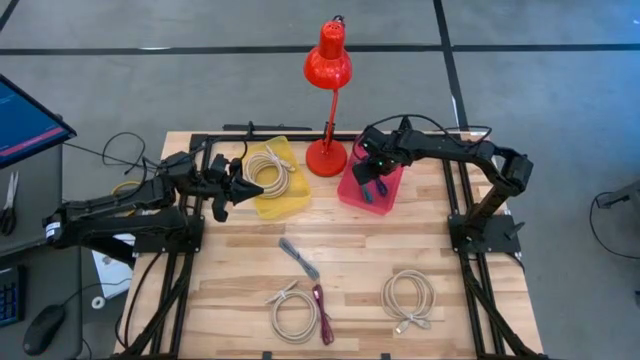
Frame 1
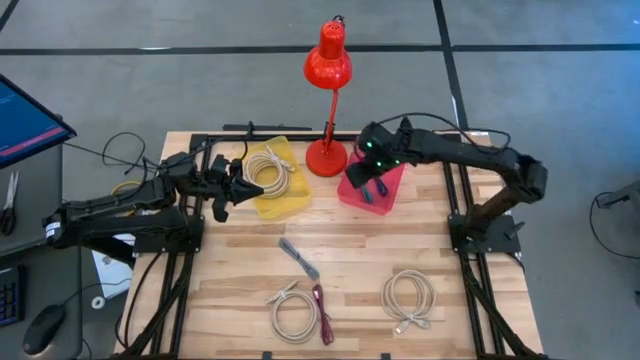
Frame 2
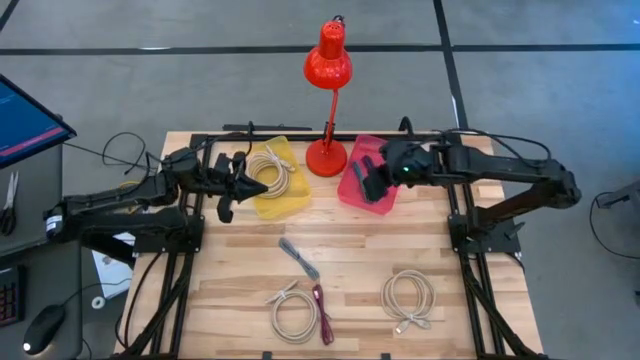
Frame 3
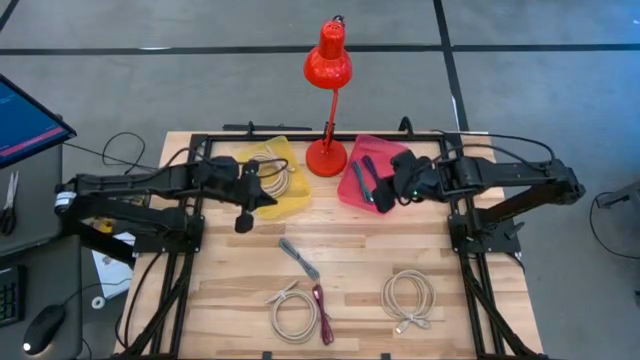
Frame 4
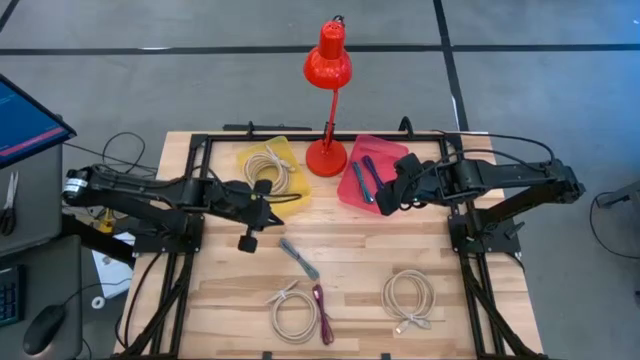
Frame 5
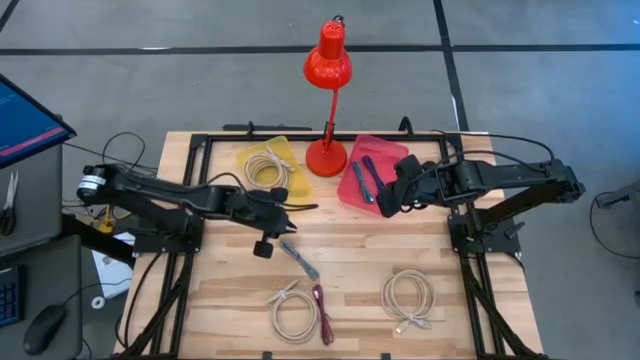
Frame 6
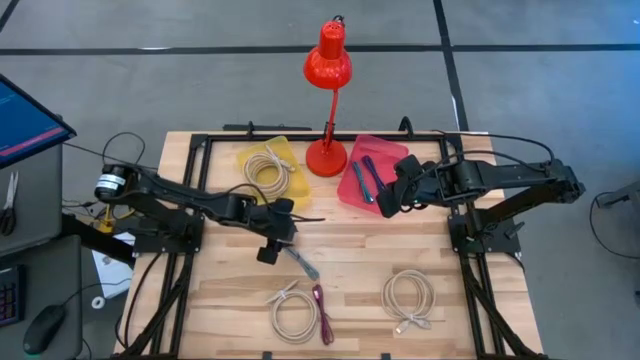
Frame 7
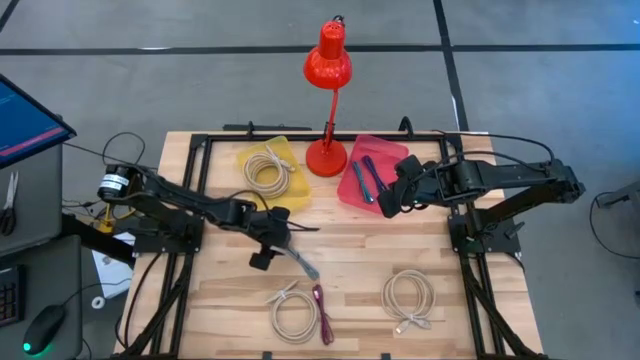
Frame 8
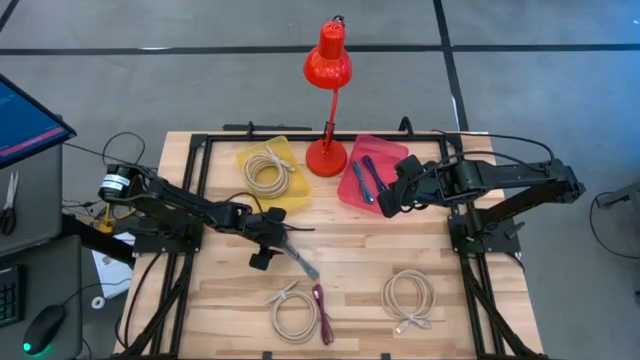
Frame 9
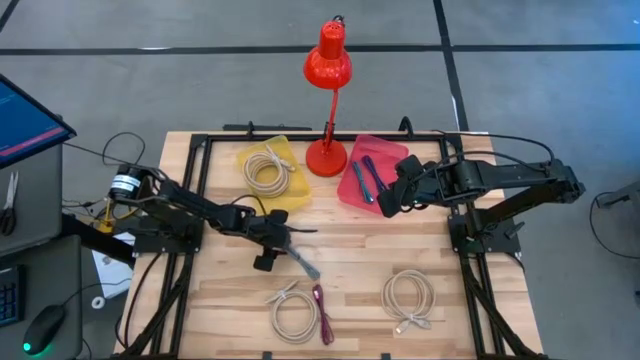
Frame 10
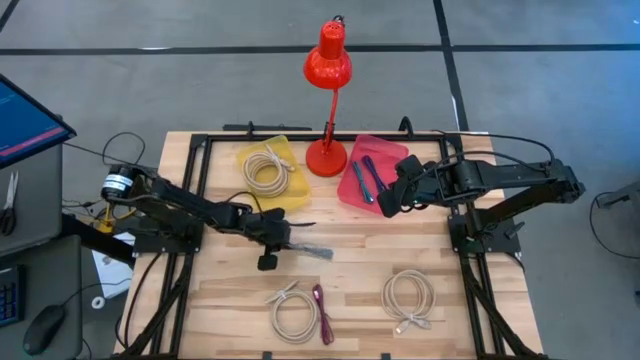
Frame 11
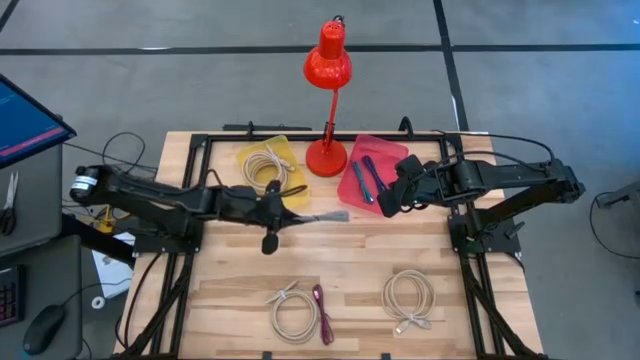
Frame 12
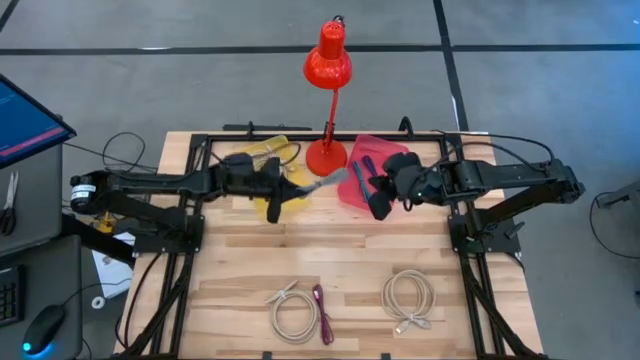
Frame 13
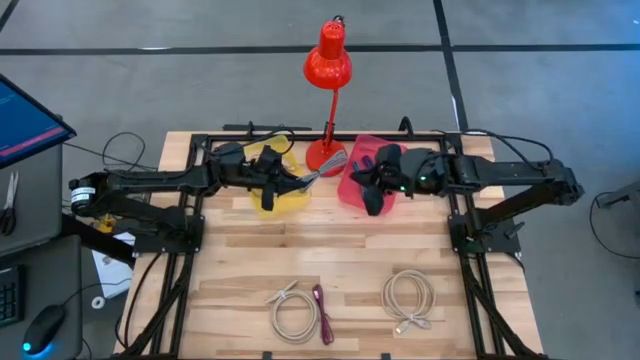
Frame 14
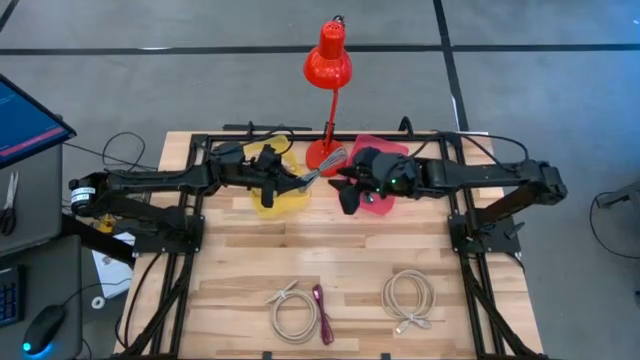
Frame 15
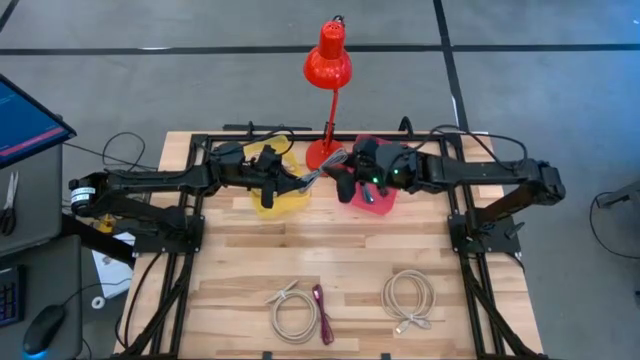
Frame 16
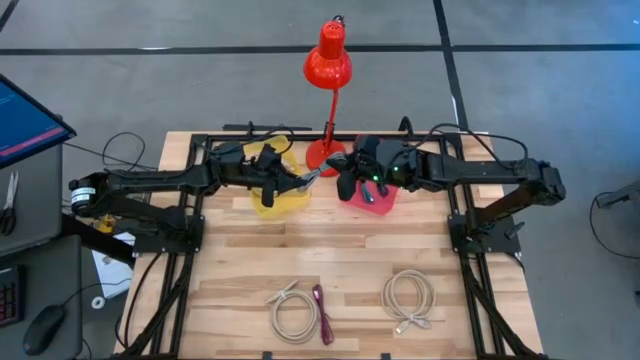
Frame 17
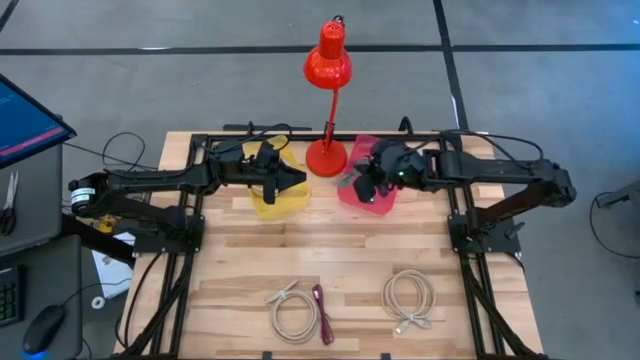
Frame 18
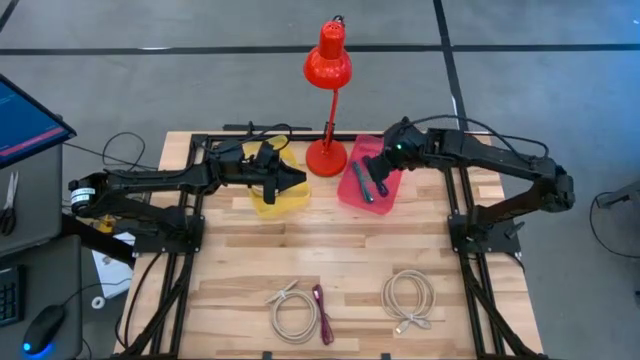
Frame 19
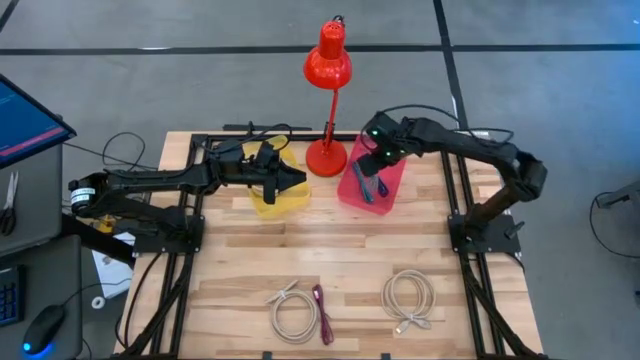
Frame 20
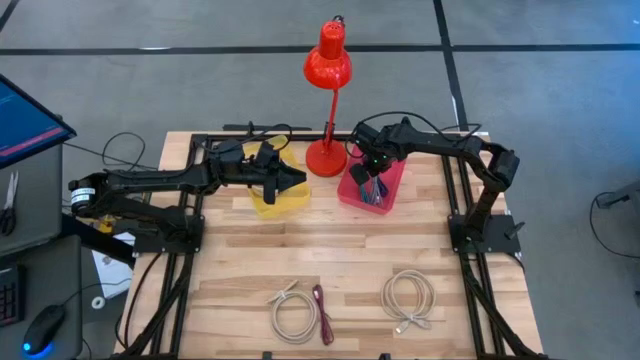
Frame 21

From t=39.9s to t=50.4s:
Task: Pick & Place USB Port
Put the black and white charger cable into the pink bin

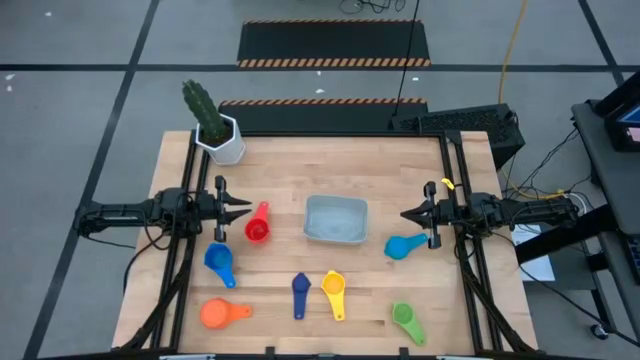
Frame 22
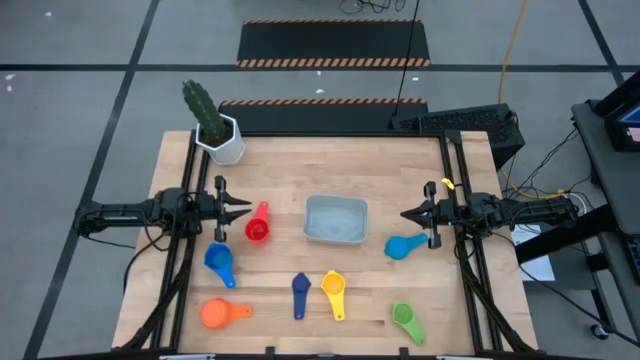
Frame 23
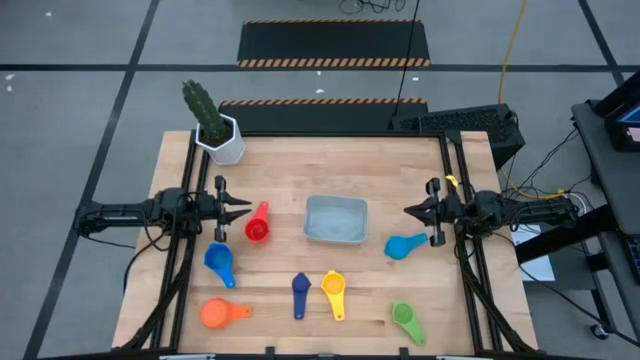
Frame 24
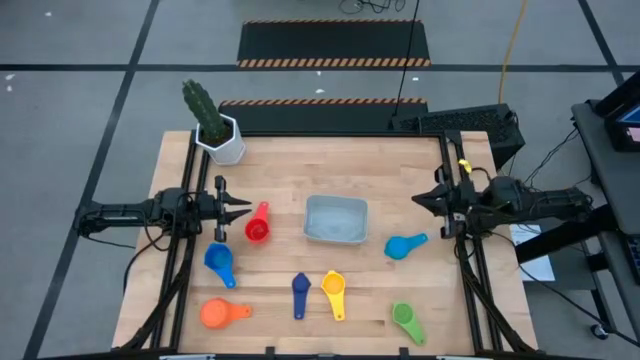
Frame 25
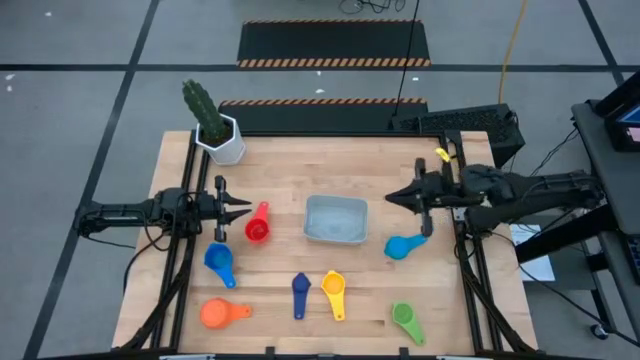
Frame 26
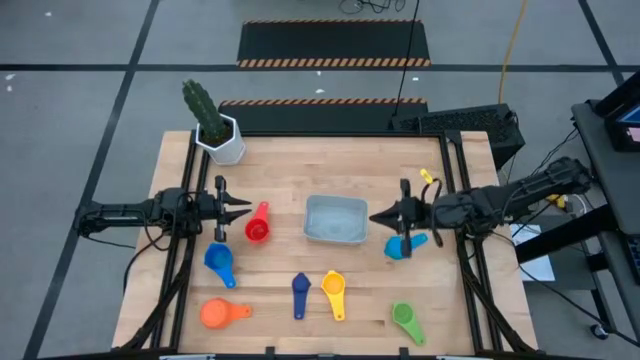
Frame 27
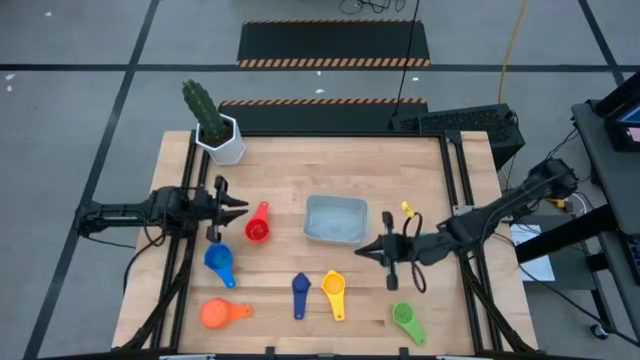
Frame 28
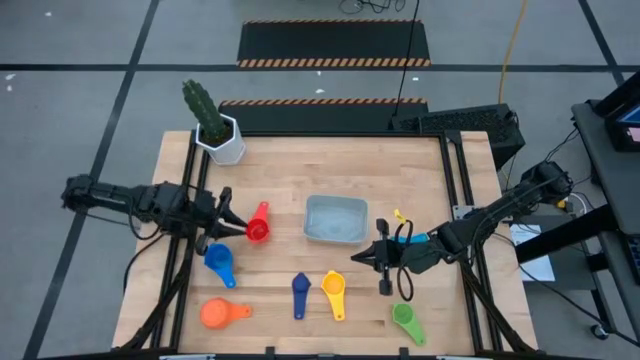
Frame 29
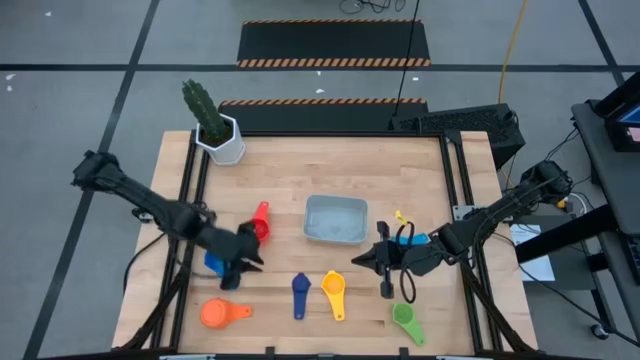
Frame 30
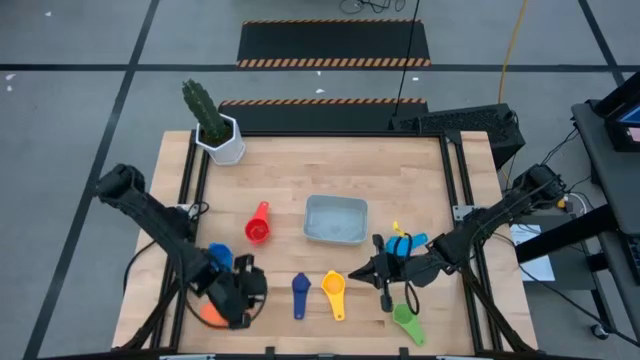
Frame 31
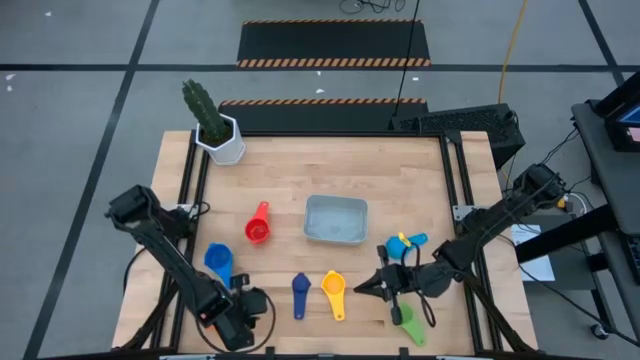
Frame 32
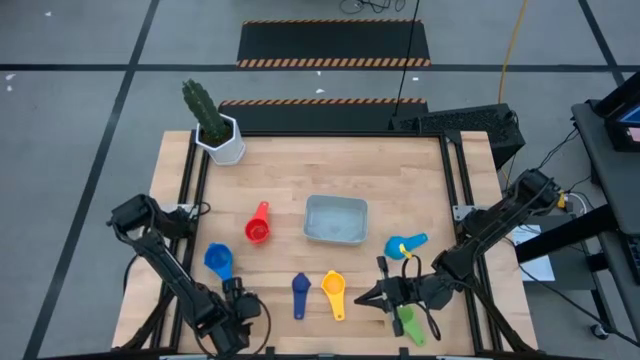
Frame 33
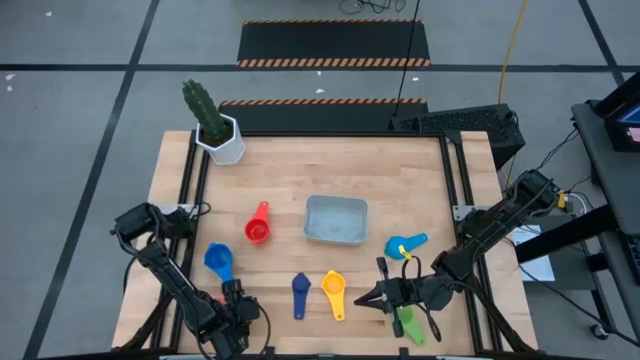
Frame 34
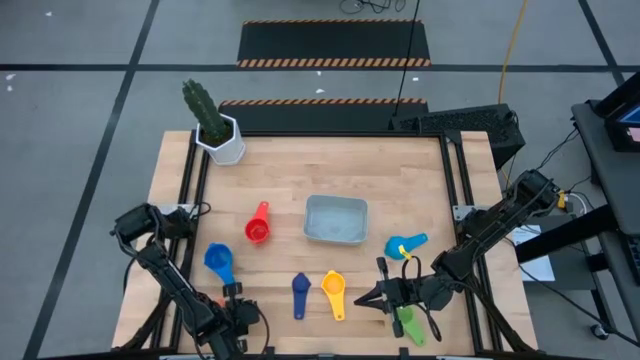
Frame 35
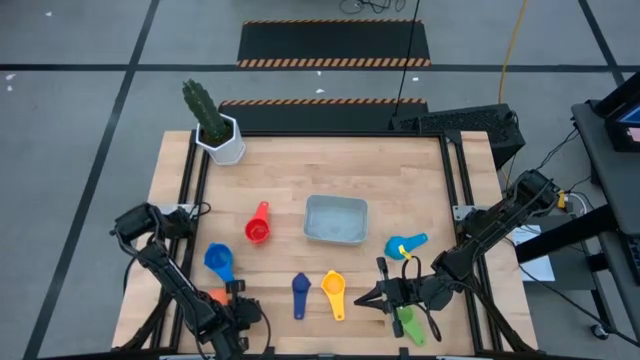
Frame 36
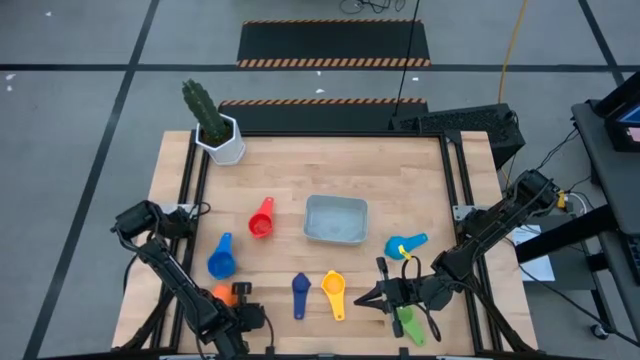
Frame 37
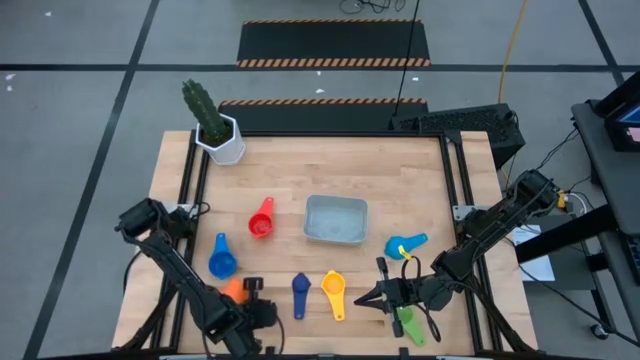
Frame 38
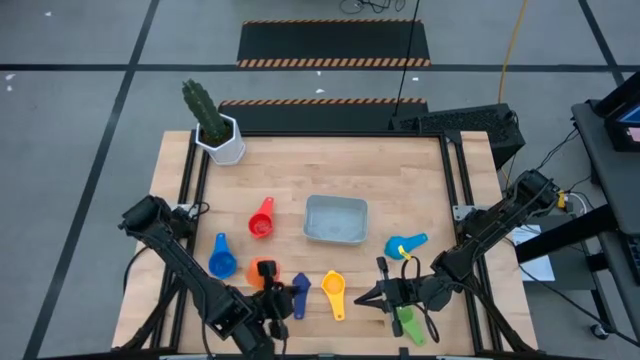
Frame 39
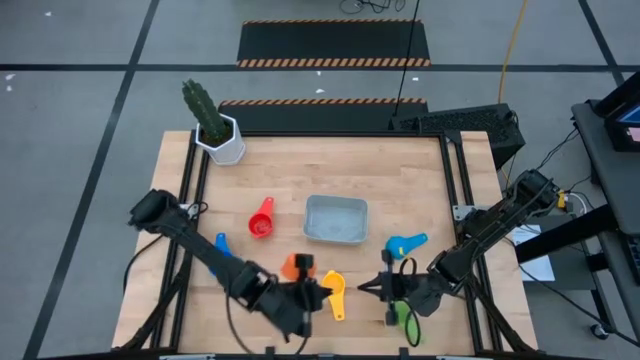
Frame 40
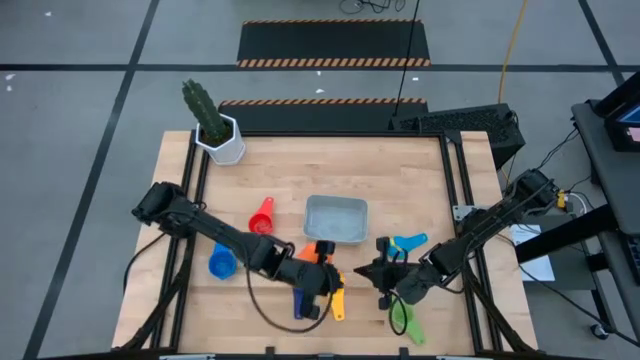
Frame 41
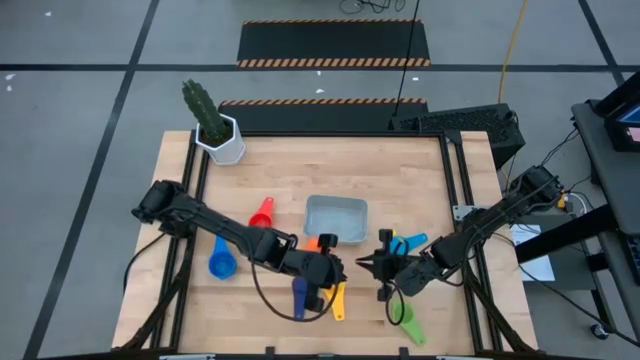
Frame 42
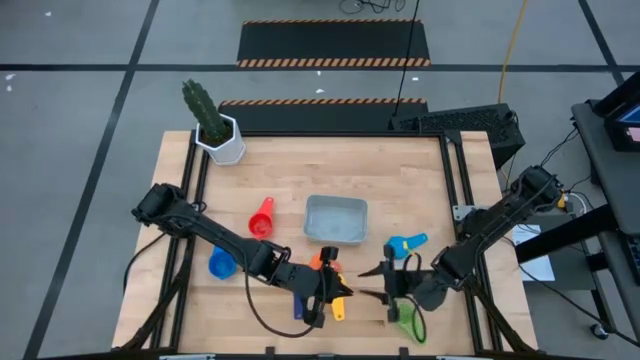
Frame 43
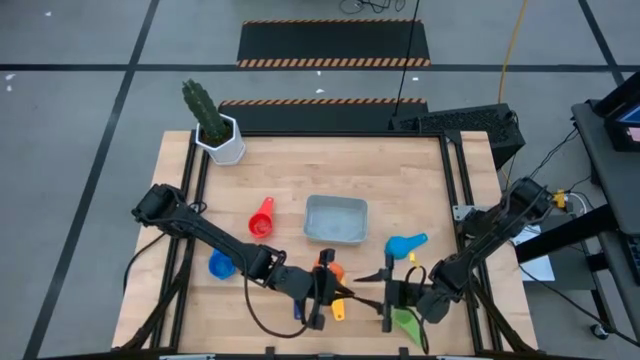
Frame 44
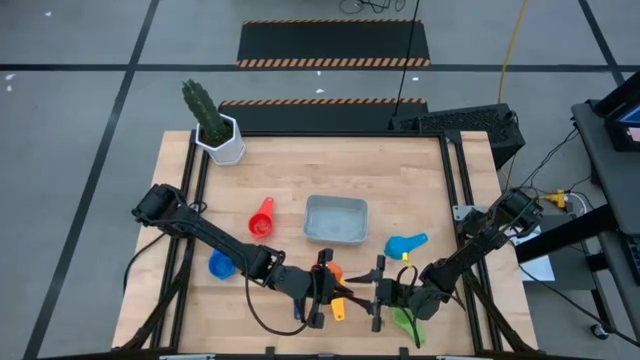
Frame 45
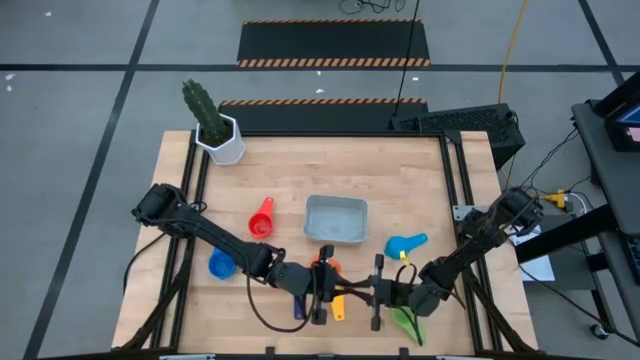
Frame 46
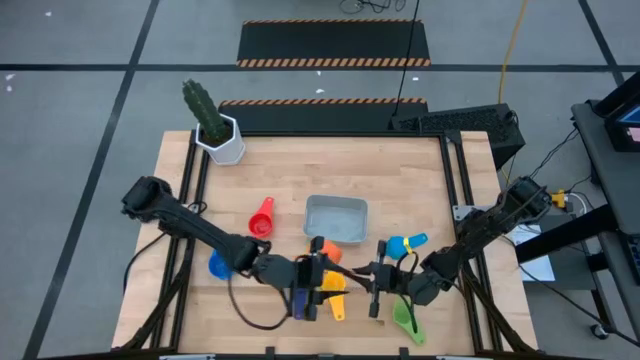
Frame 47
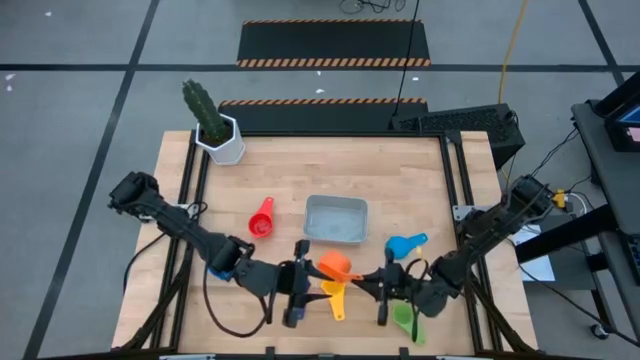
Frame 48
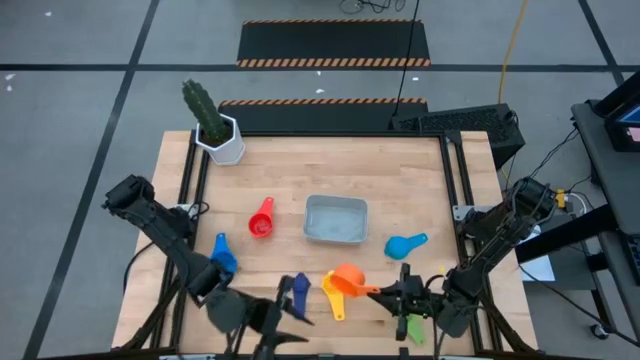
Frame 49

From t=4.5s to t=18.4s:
Task: Nest measuring cups in basket
Put the orange measuring cup into the bin
